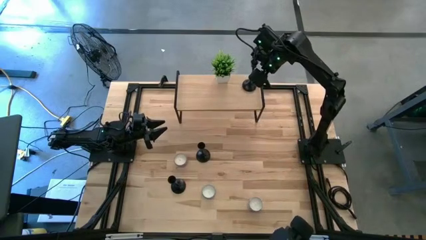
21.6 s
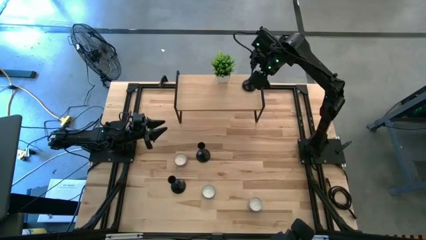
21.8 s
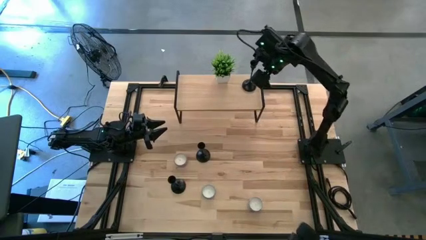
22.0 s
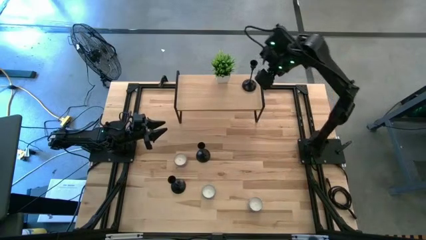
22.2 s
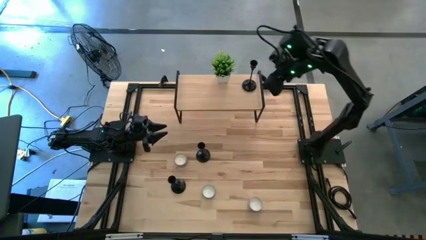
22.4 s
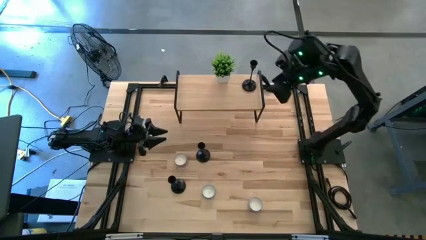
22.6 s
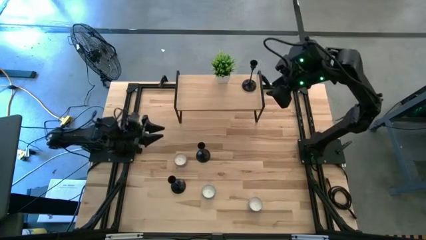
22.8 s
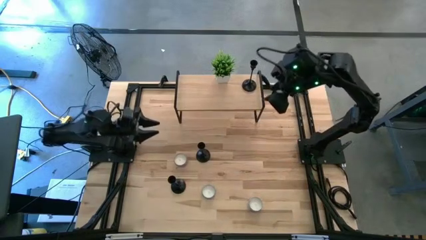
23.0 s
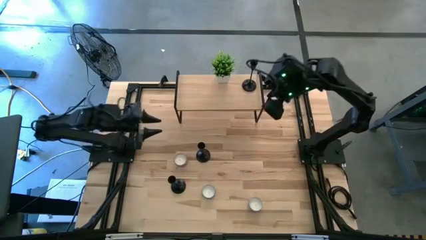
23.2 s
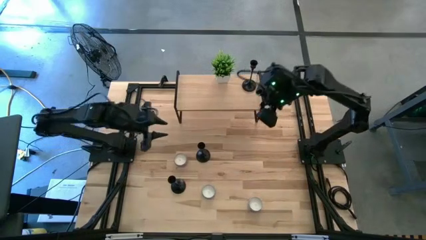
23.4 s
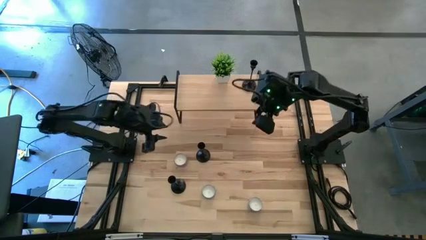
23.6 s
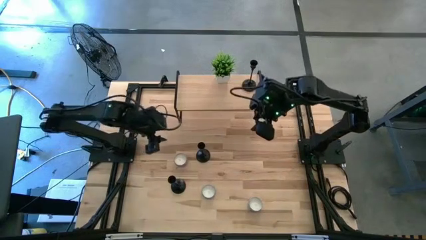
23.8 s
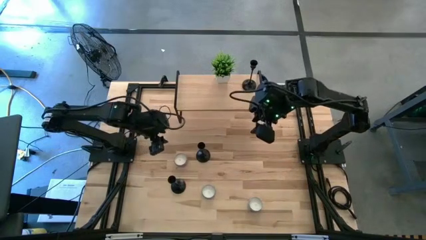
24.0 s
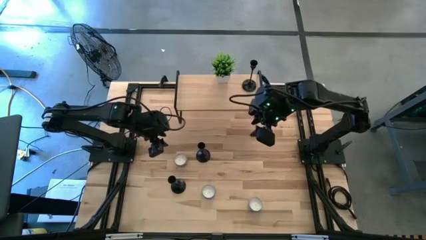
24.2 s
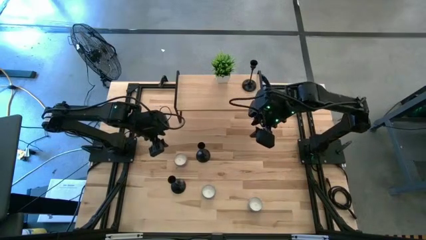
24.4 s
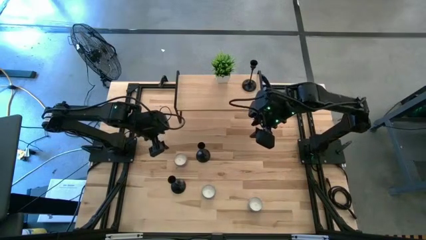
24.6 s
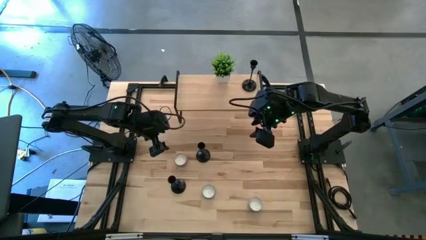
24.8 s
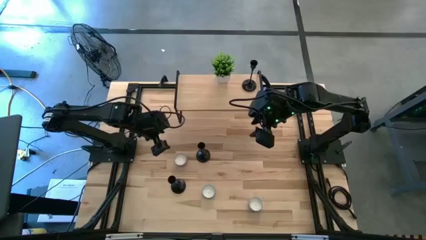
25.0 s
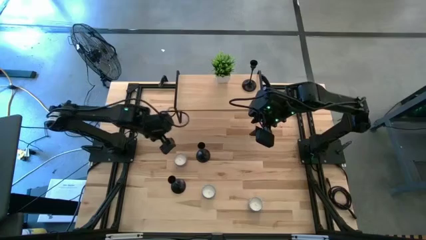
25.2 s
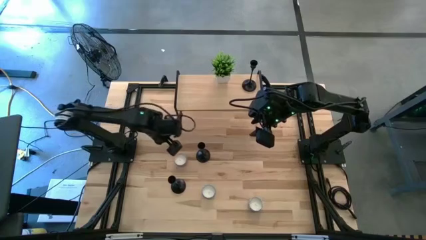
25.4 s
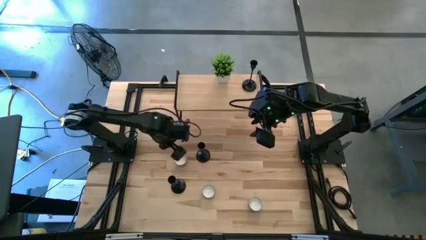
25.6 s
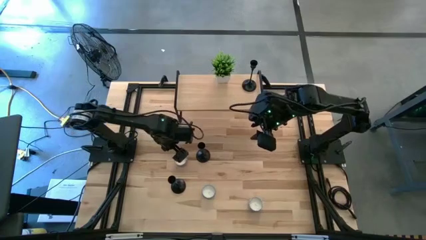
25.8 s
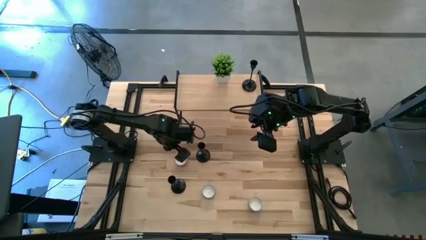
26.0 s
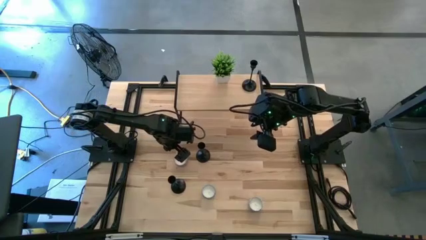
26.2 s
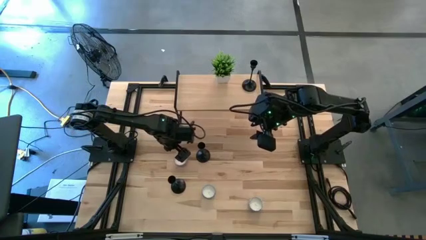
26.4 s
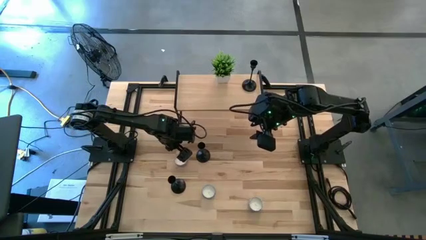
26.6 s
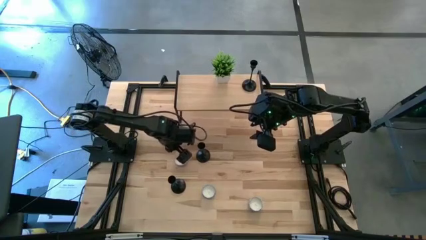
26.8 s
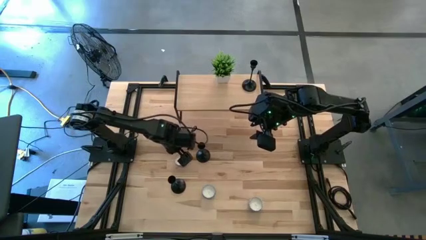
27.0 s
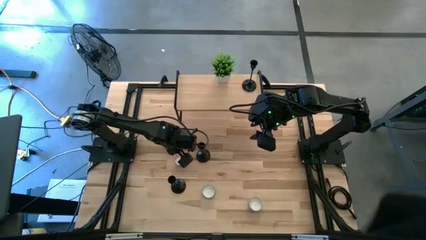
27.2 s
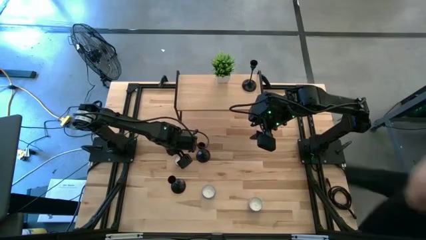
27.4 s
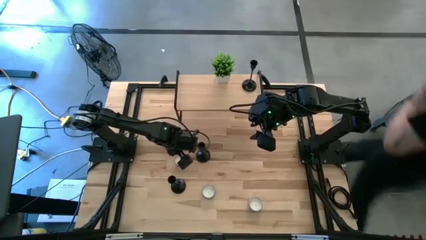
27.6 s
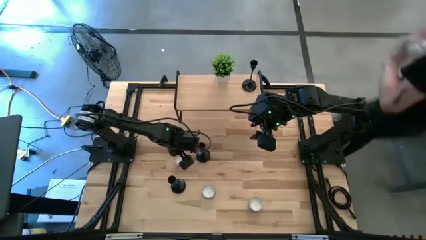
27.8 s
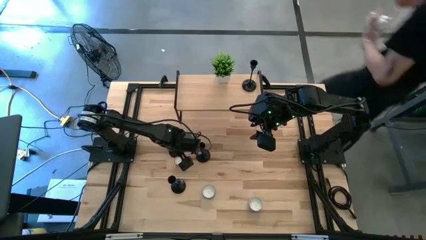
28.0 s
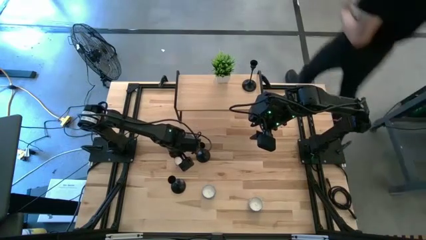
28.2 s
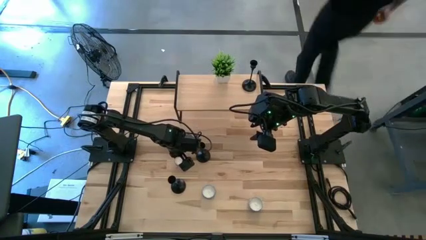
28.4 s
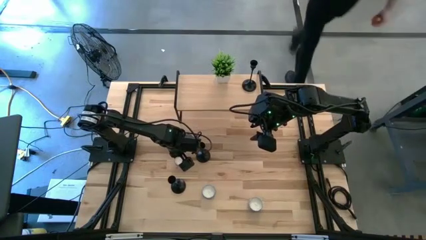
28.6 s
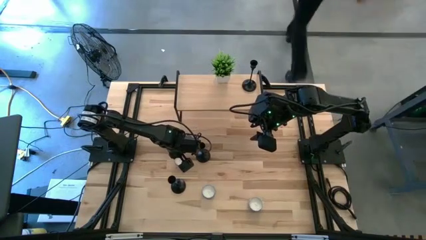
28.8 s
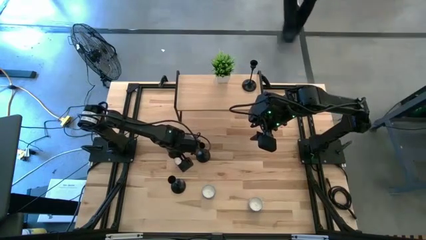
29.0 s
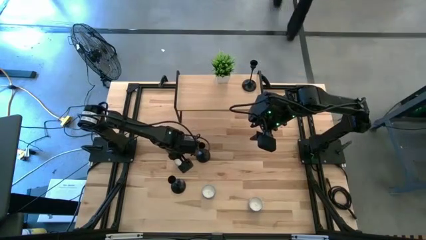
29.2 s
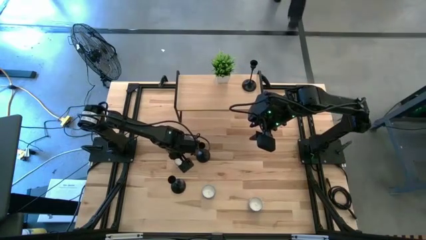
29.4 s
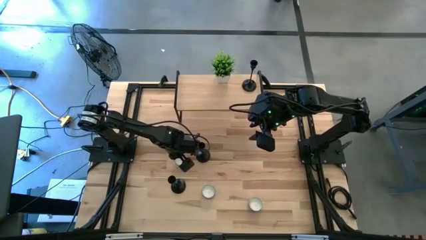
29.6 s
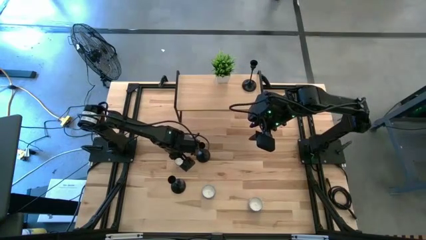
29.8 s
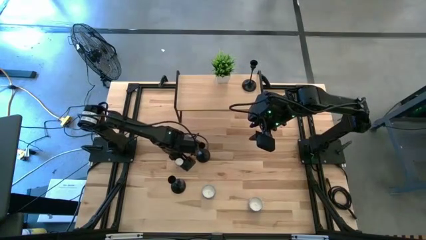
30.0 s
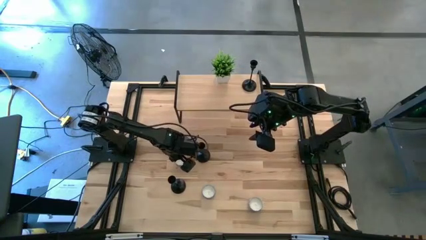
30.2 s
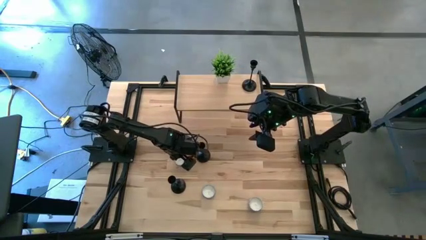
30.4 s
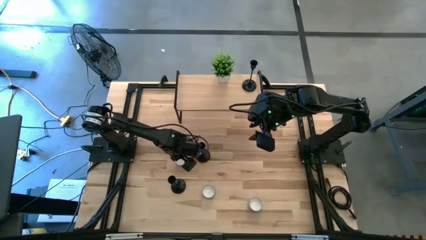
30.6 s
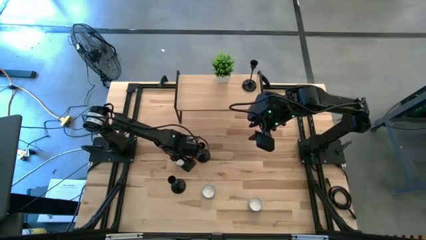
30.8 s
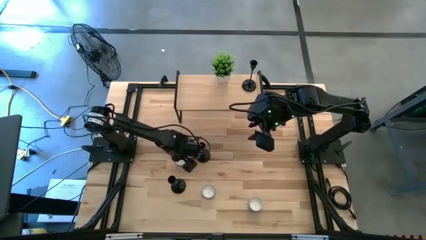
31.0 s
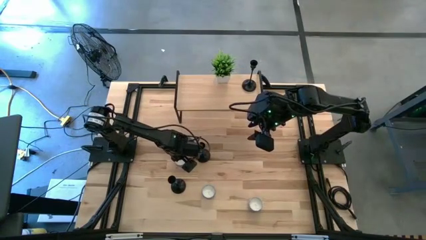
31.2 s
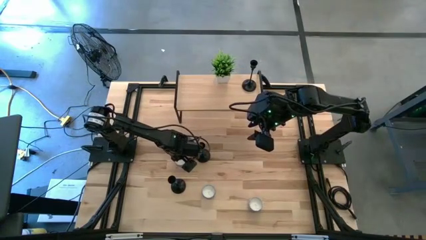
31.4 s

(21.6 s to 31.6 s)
Task: Pick & Place candle stick holders
Put the purple pink scented candle on the shelf

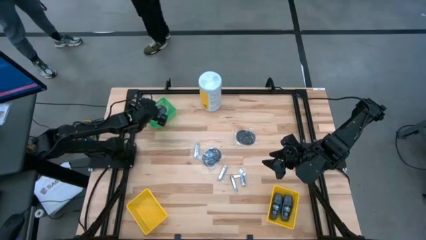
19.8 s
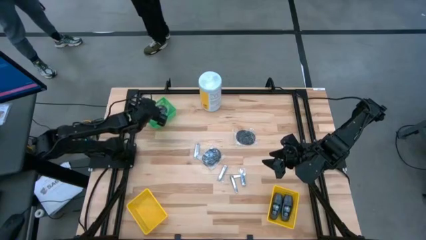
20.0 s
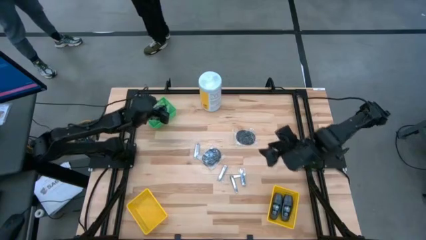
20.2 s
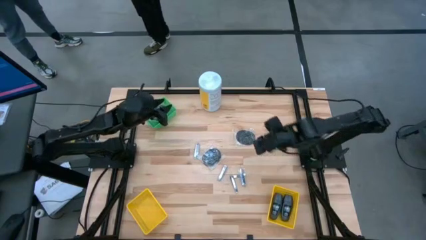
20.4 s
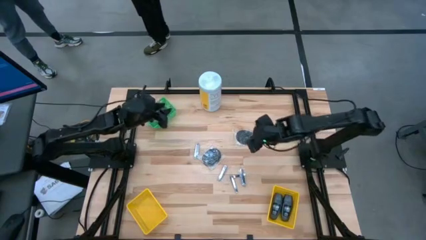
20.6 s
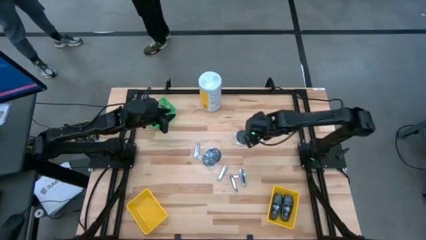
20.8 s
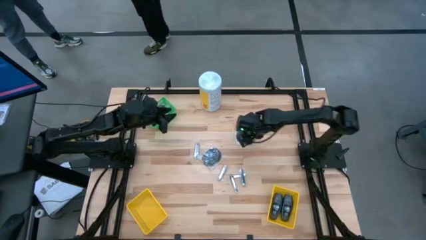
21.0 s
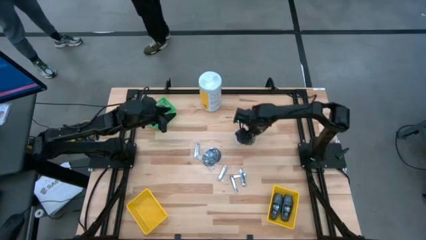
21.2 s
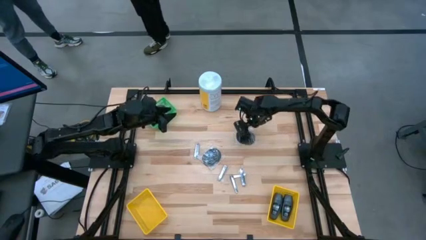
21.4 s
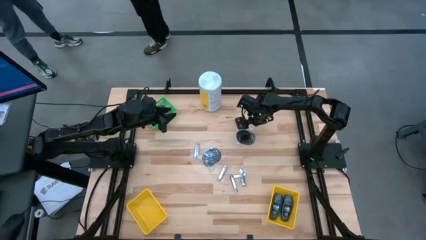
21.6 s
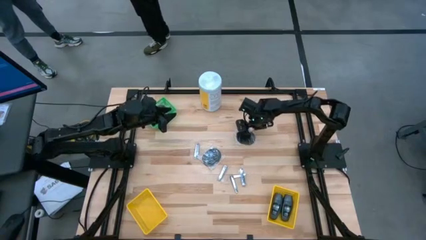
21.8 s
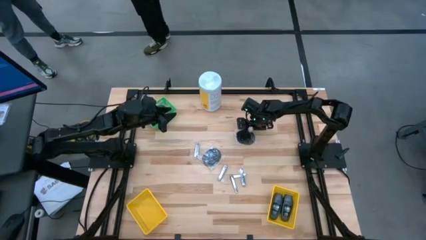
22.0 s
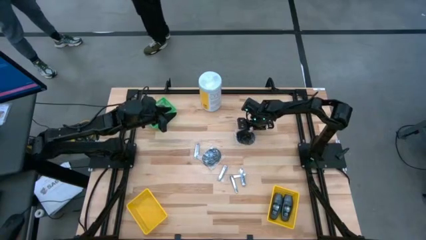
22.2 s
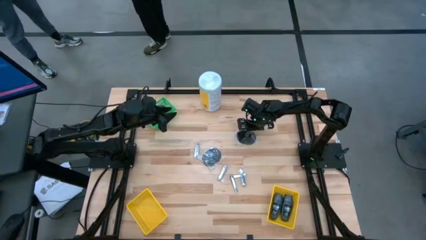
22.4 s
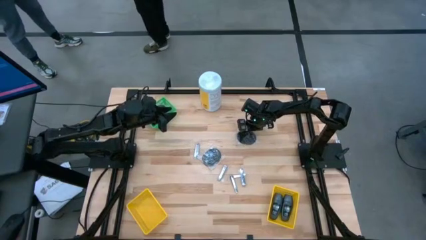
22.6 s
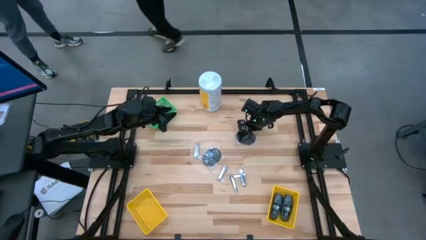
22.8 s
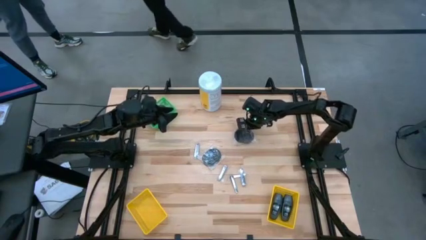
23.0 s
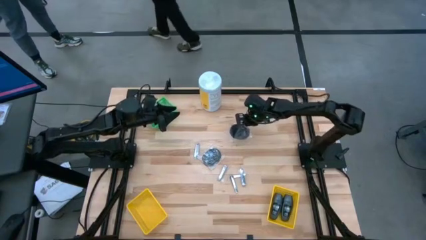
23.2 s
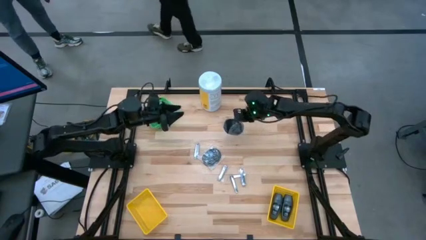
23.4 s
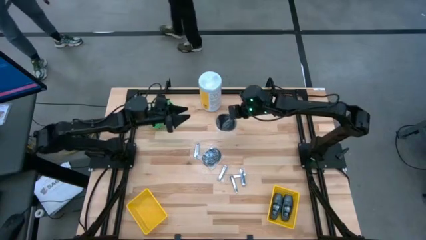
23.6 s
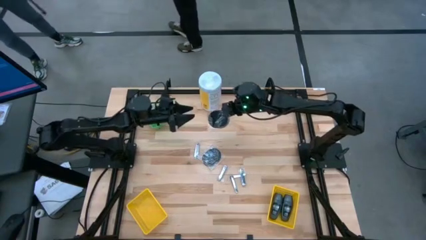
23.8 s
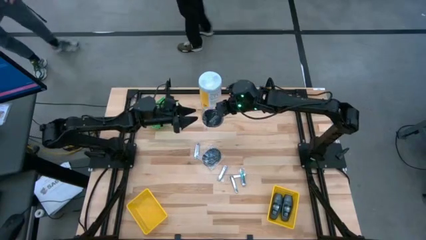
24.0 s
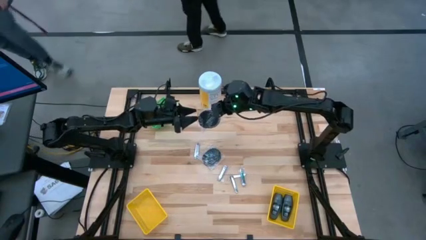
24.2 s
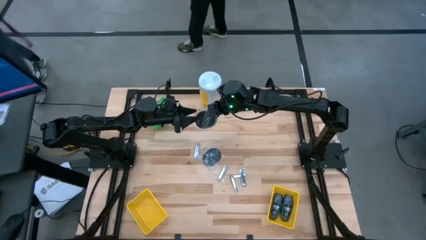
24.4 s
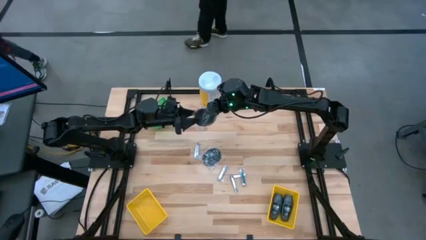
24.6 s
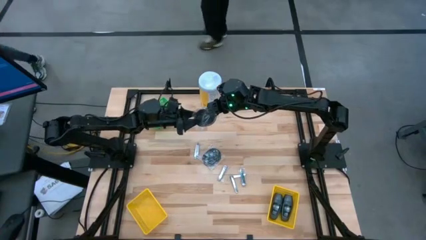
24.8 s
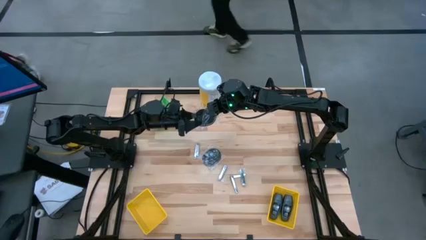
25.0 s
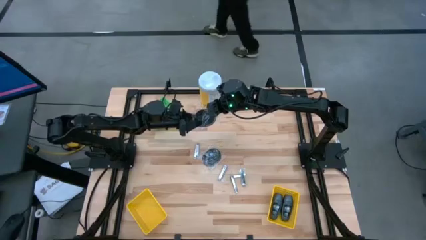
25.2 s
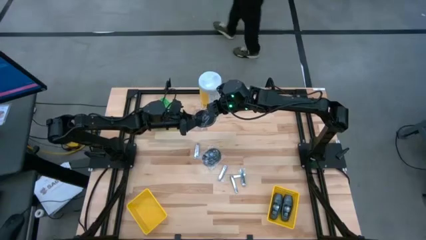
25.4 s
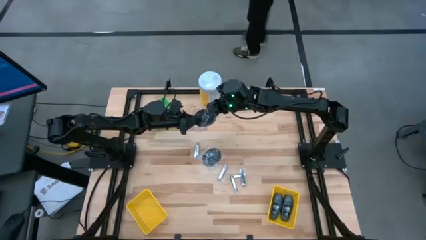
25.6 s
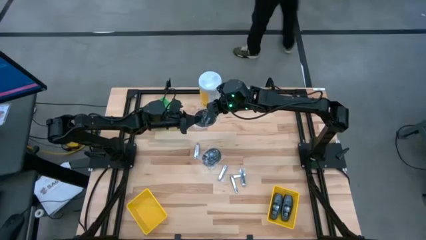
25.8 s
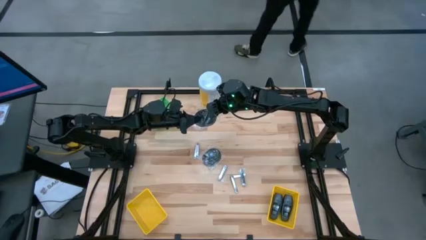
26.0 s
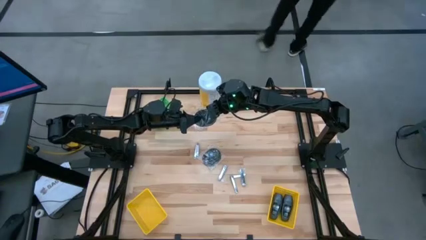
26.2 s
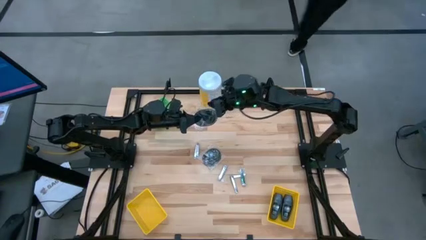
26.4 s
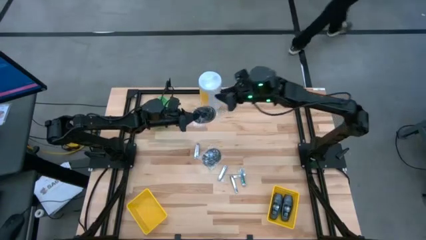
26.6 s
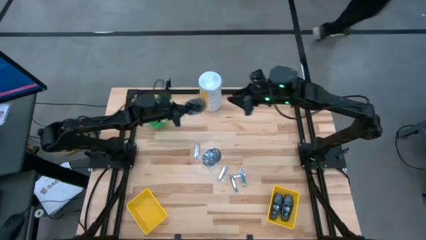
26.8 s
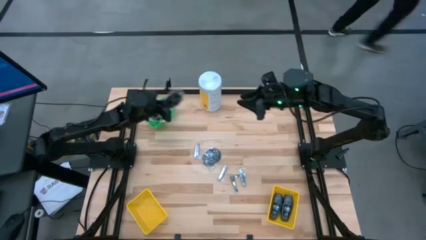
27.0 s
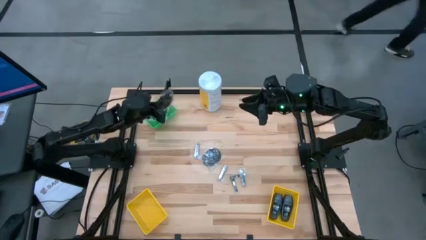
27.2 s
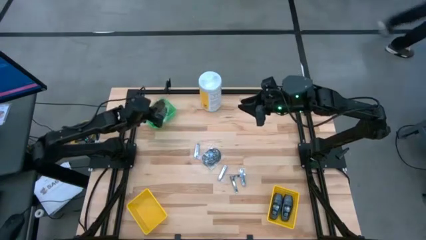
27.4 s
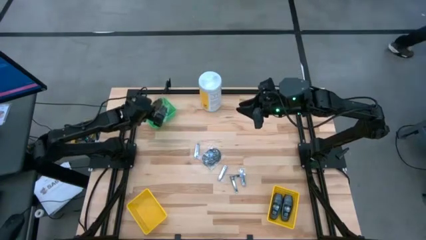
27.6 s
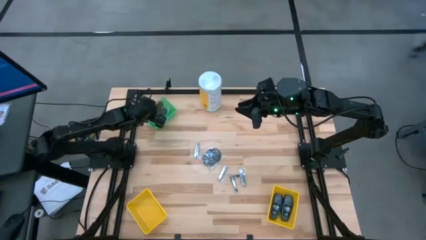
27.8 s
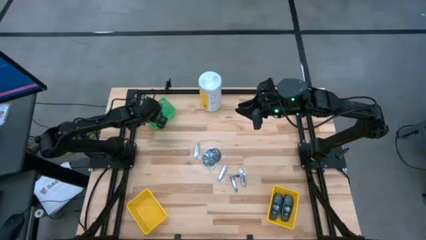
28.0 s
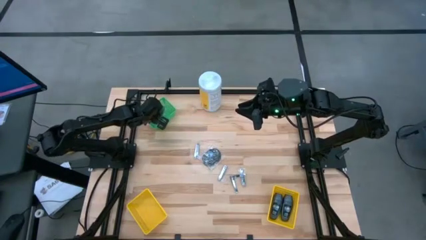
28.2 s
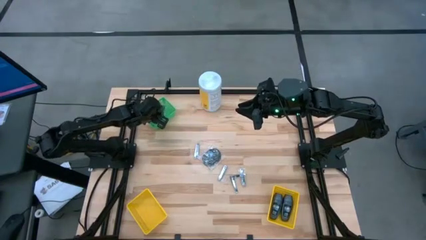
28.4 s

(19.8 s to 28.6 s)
Task: Pick & Place Travel size toiletries
Put the black hairbrush into the green bin
